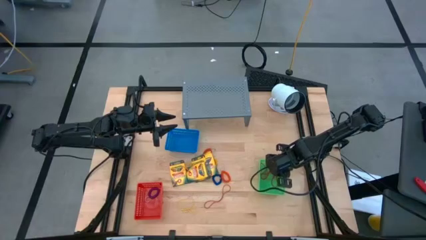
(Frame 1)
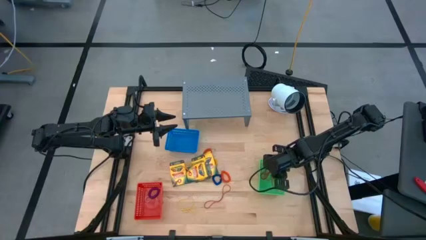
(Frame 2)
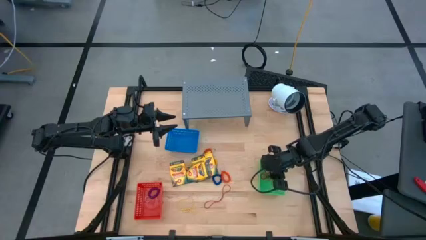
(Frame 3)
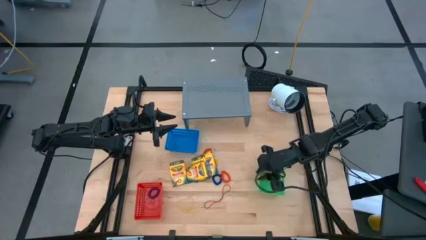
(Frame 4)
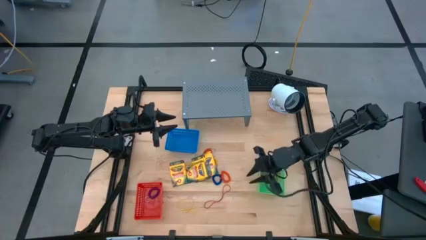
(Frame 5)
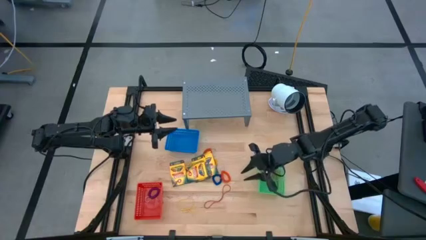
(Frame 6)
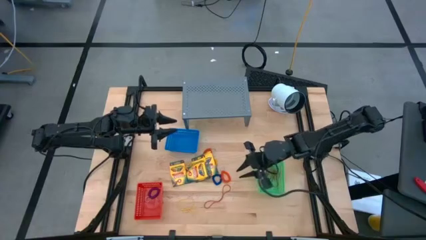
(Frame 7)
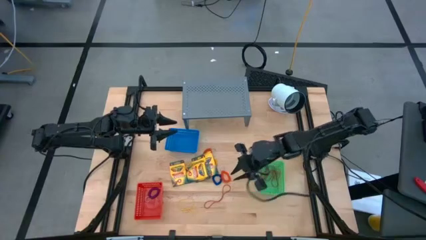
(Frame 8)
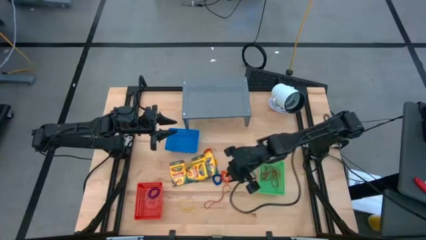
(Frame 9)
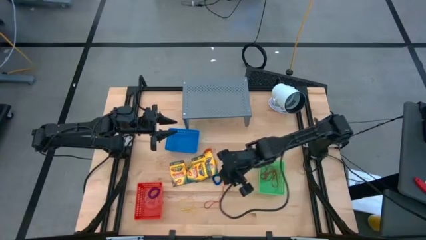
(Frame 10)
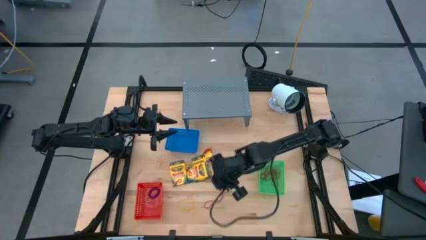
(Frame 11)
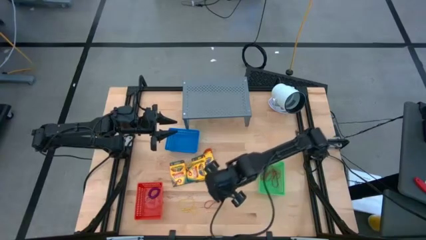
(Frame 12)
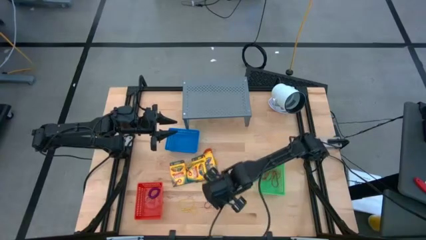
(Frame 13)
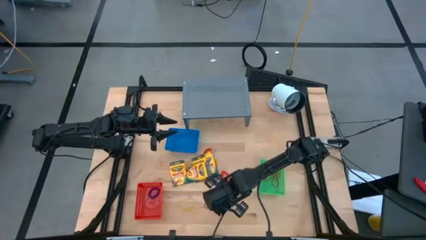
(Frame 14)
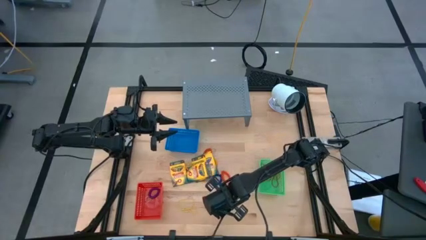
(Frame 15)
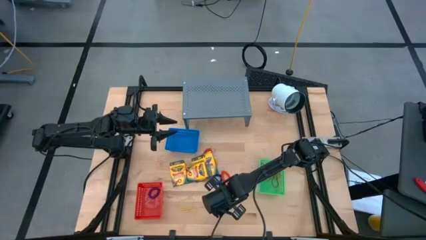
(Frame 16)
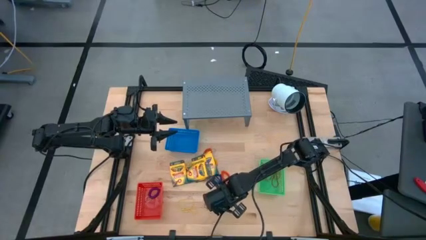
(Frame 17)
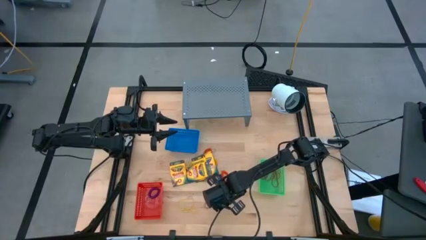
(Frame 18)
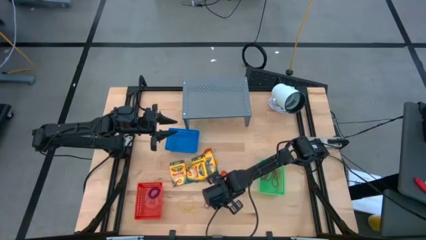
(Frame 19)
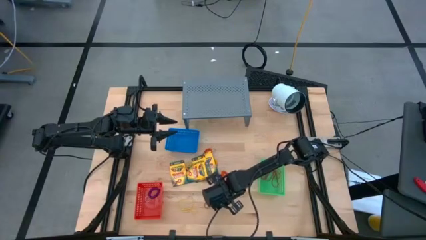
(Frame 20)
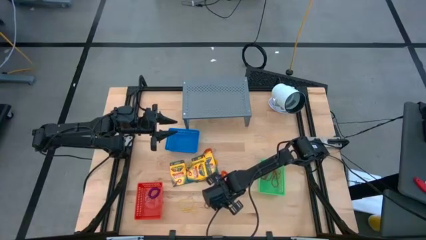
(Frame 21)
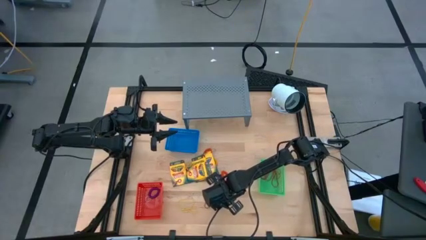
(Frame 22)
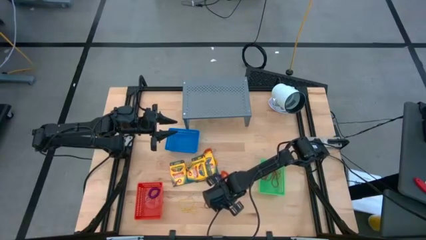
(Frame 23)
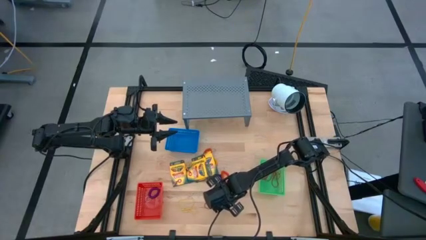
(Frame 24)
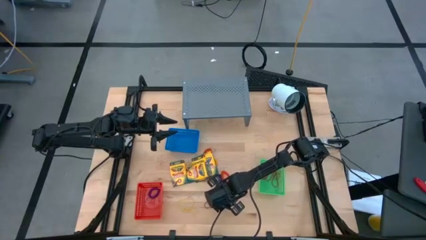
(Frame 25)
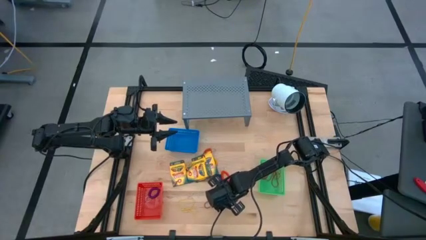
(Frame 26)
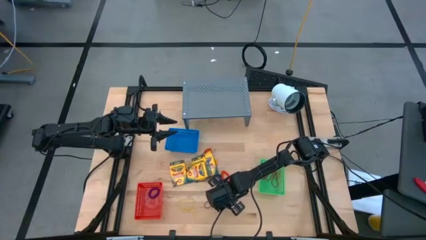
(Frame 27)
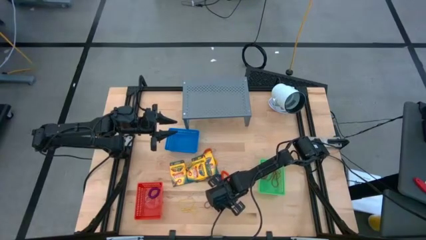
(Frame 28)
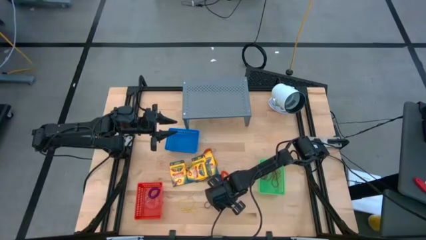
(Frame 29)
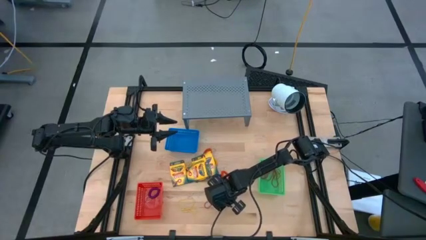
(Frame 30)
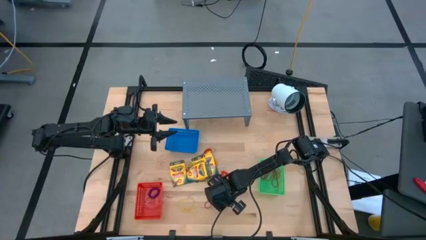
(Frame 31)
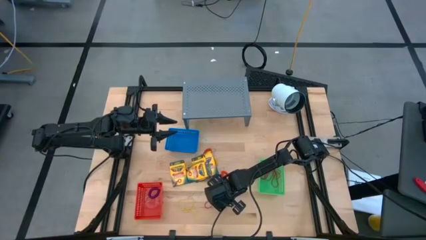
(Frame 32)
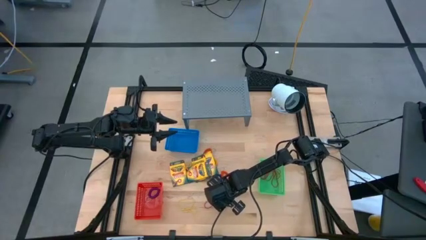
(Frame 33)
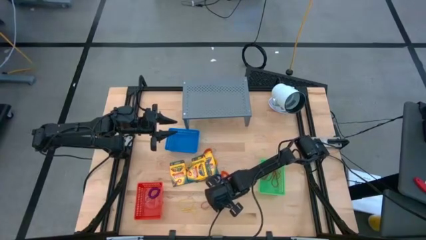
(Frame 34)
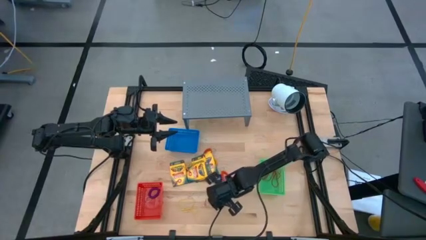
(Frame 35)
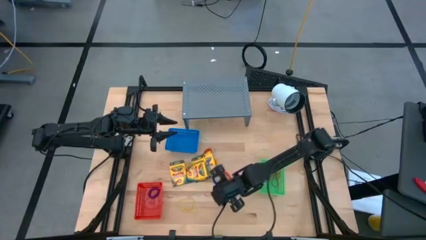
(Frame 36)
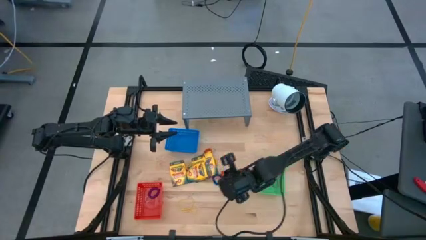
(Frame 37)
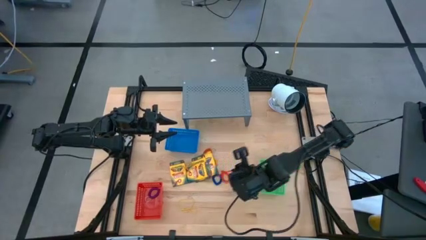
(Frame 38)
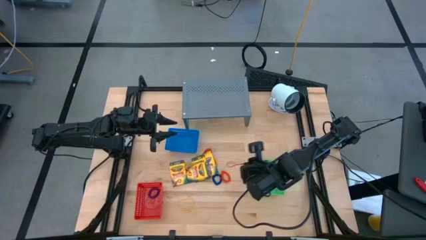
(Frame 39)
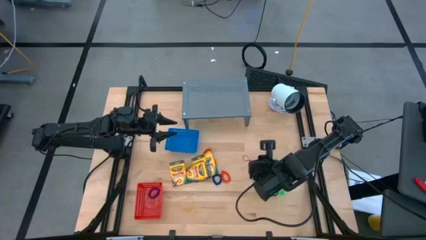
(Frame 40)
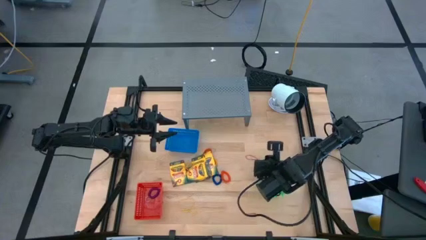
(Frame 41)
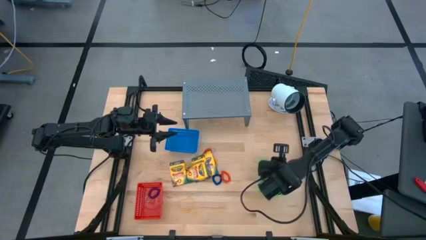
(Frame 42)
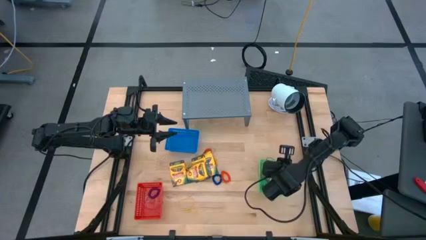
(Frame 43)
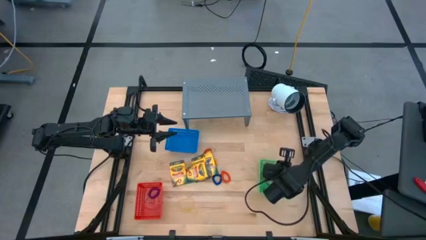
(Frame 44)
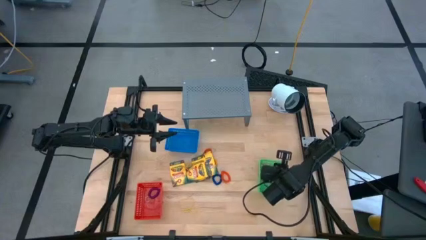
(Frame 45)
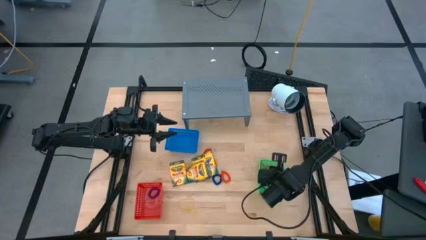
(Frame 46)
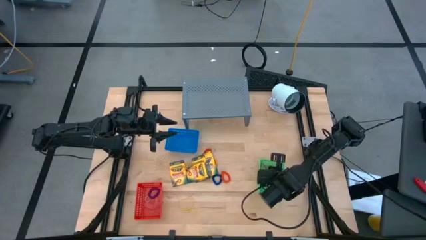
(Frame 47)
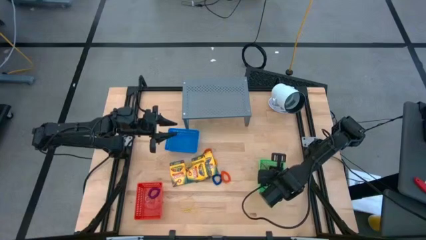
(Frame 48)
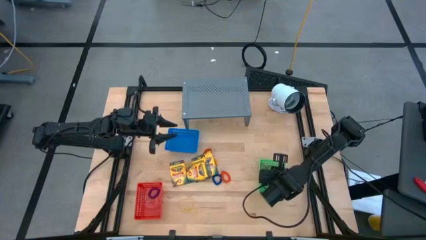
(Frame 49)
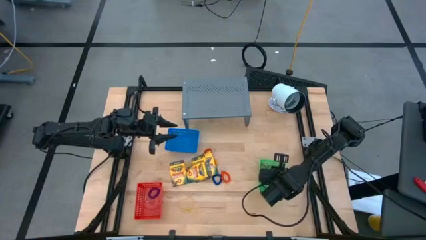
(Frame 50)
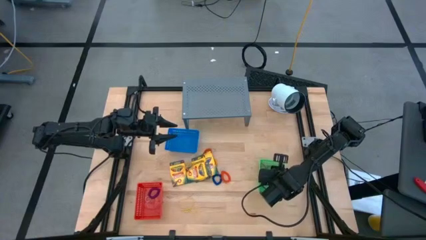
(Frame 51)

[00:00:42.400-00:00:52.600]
Task: Pick & Place Office Desk Supplies
Put the red rubber band into the green bin

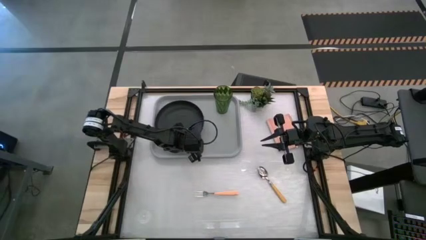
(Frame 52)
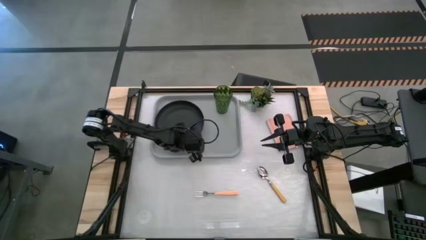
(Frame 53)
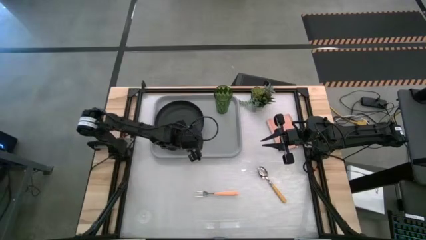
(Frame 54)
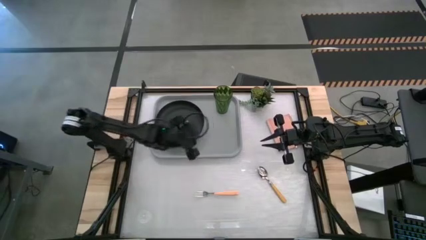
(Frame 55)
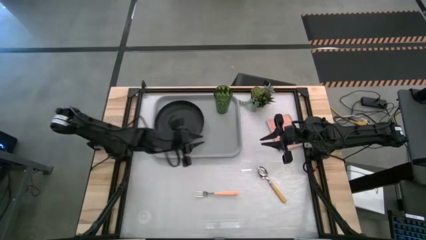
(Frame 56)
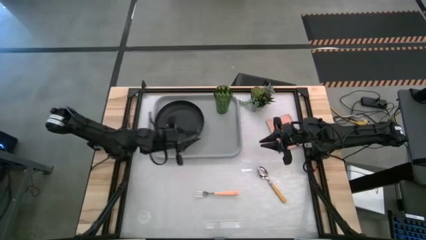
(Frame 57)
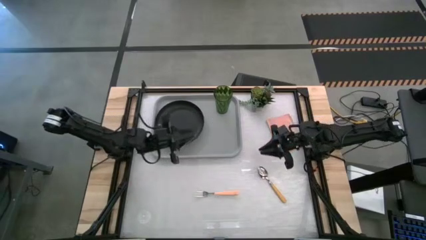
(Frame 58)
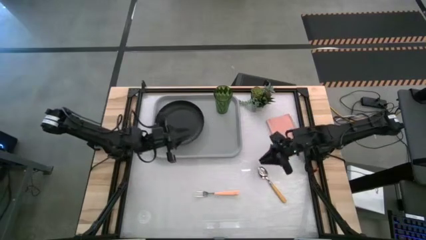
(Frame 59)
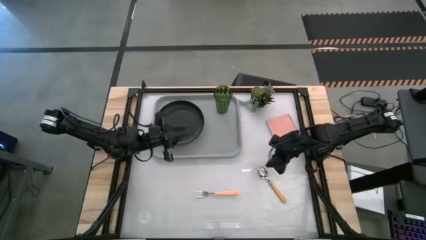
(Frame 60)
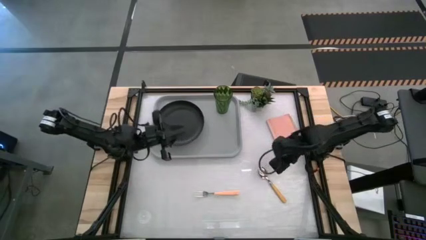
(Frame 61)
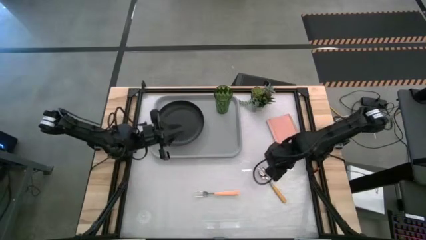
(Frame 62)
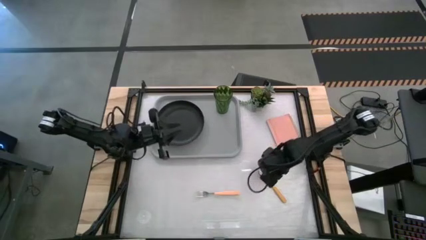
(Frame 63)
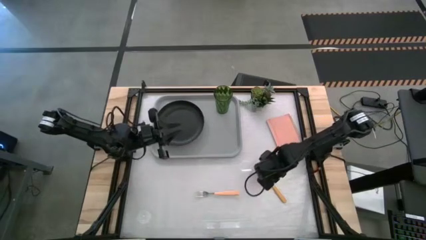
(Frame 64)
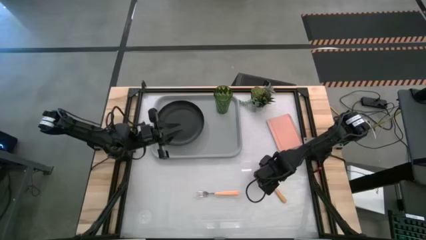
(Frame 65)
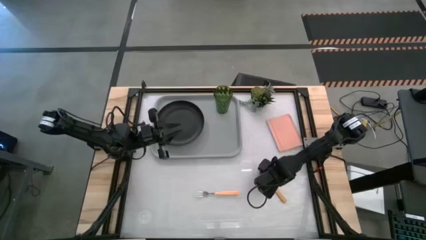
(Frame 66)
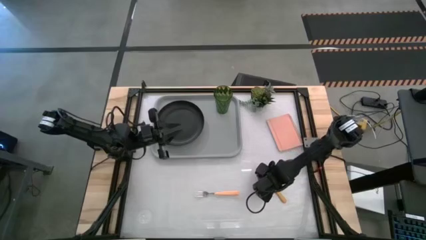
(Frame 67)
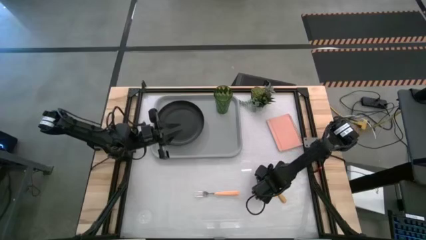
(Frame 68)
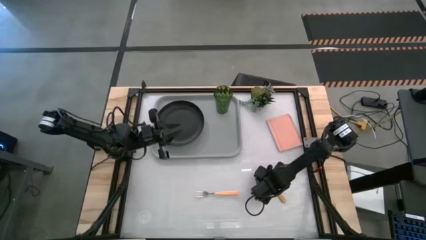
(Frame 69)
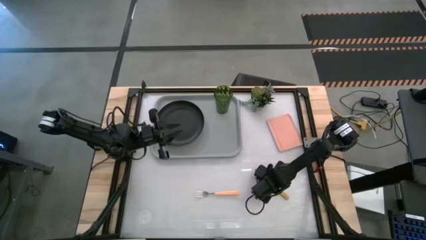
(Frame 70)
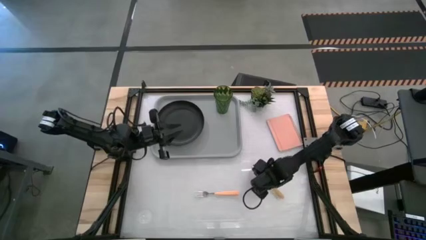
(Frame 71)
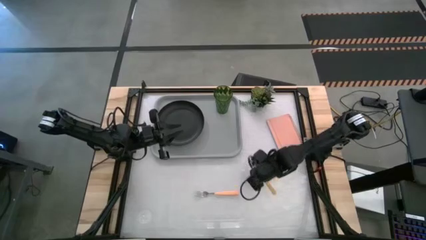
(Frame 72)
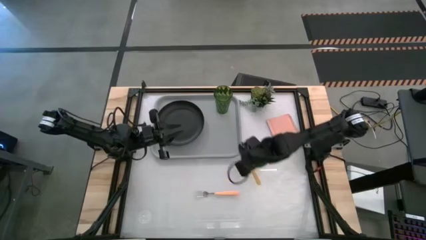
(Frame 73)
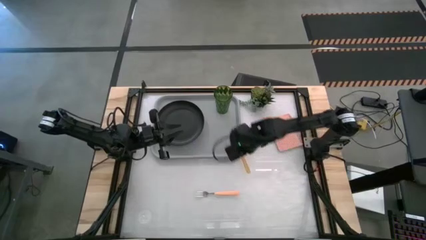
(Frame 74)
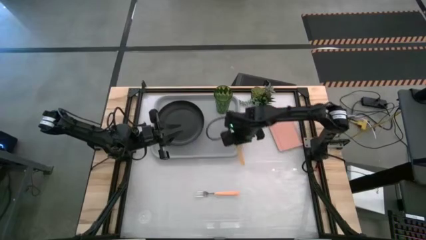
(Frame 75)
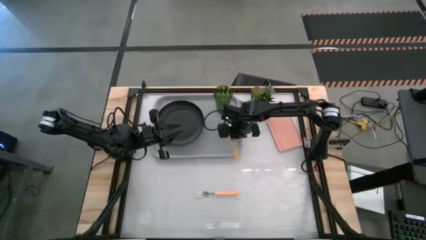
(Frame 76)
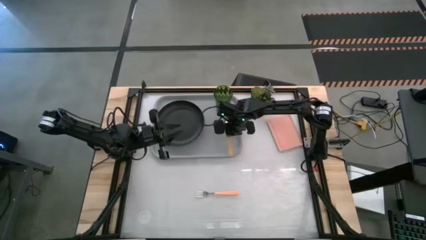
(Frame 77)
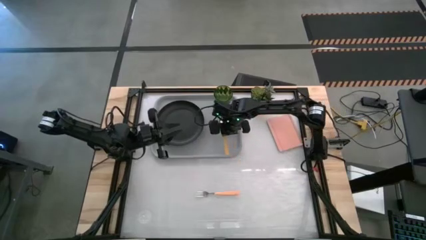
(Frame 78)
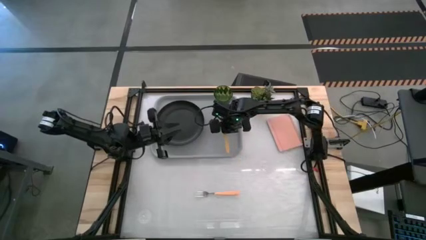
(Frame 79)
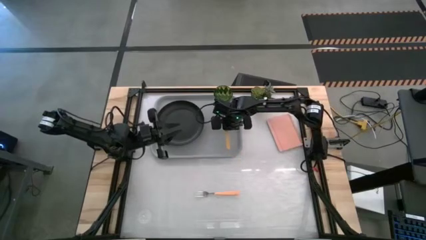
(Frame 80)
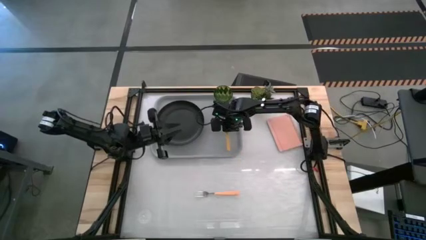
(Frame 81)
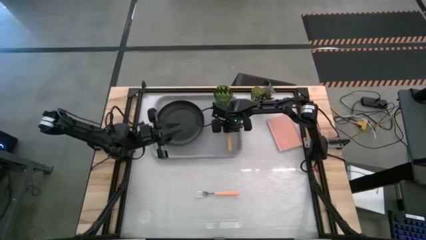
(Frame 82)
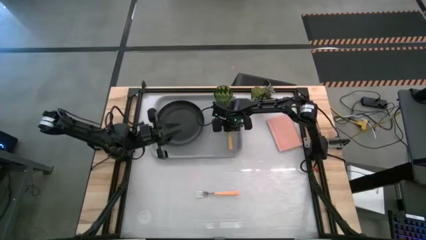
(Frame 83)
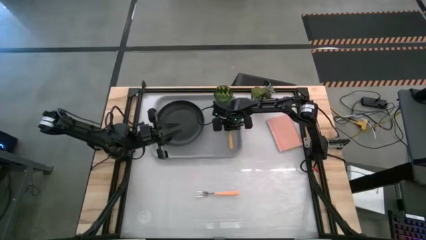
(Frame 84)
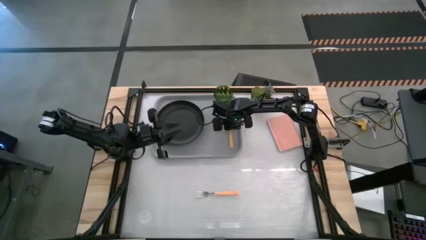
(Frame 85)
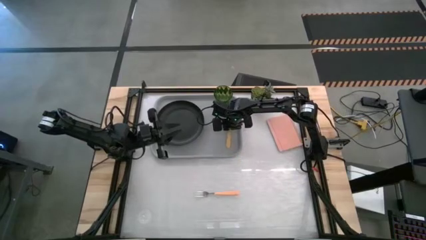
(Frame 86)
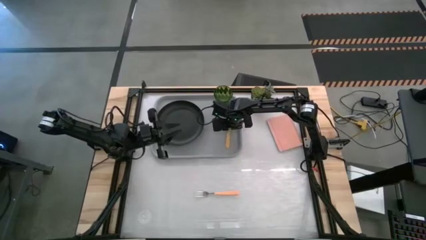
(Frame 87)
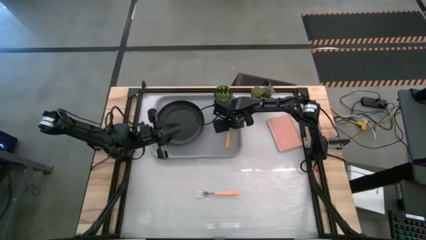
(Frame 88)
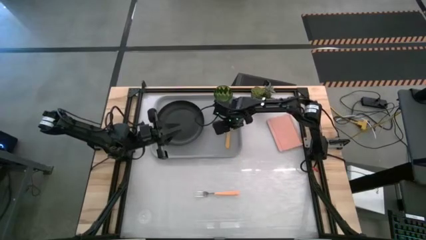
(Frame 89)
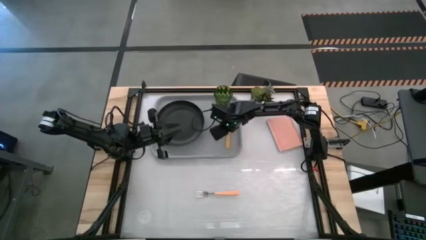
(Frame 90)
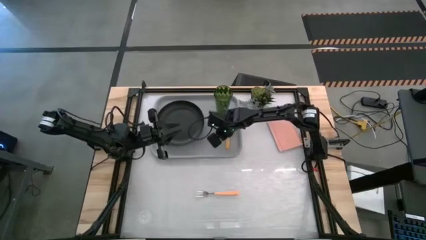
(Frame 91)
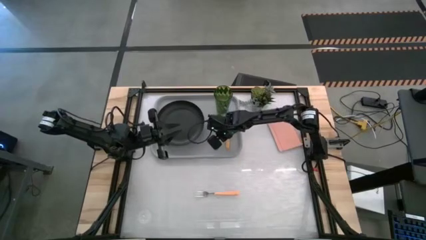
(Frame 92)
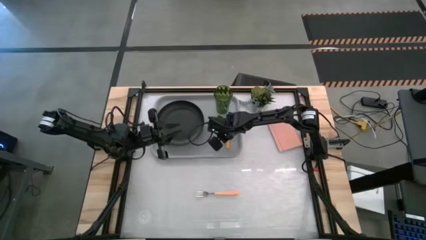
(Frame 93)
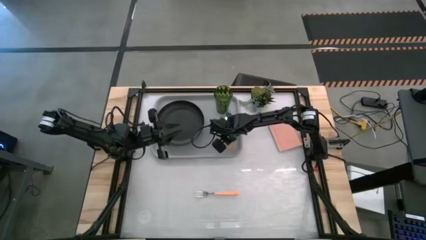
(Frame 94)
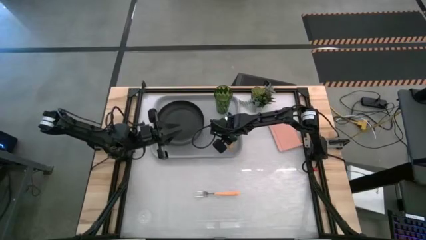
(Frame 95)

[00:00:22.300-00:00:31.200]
Task: Pick and place plate/cup/fork/spoon on tray
Put the brown spoon on the gray serving tray on the bottom of the green cup
